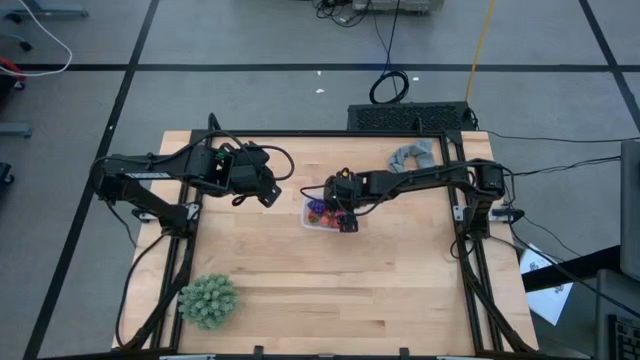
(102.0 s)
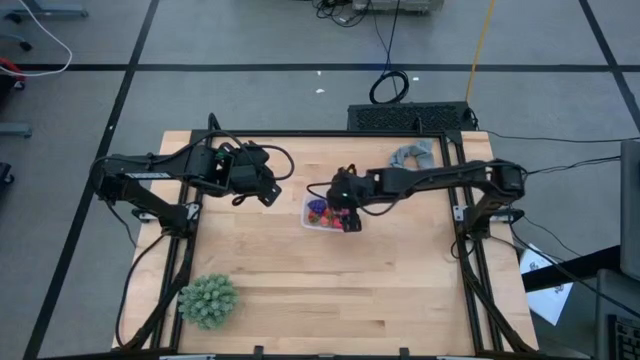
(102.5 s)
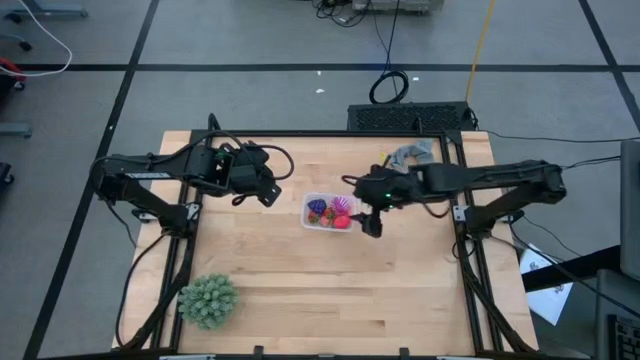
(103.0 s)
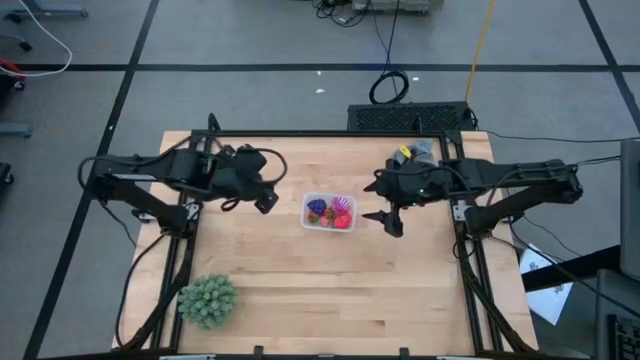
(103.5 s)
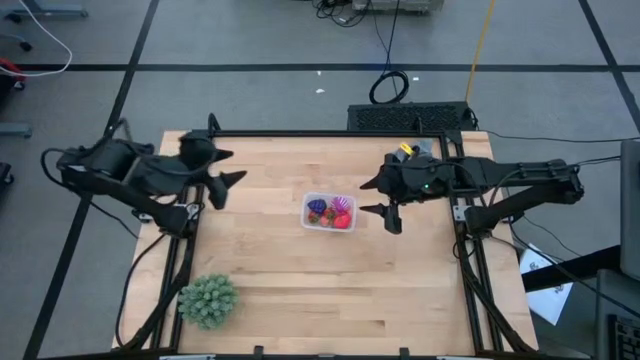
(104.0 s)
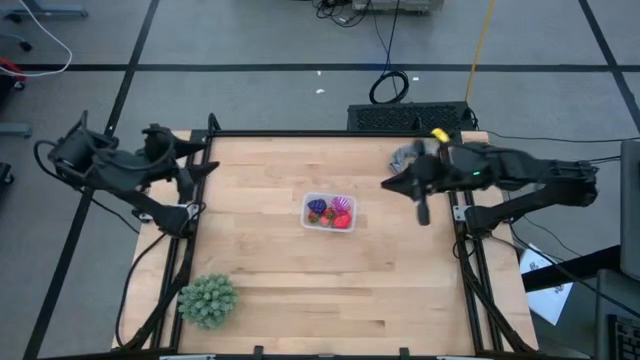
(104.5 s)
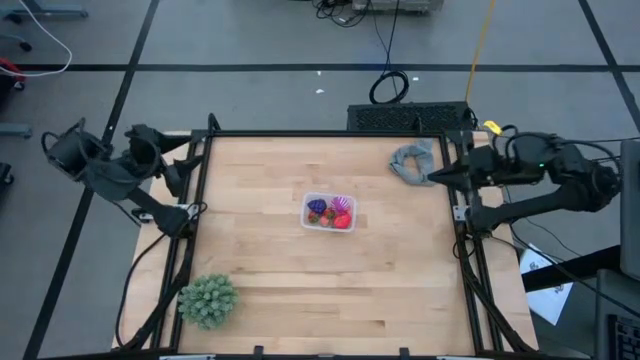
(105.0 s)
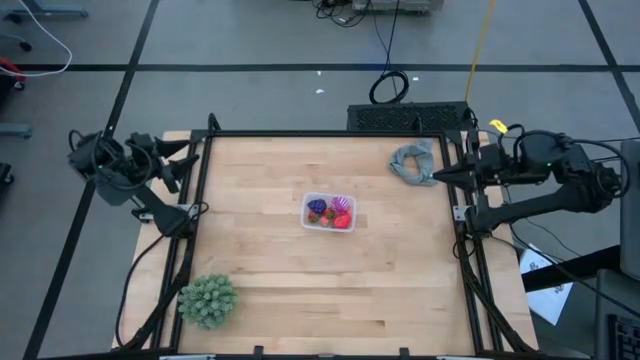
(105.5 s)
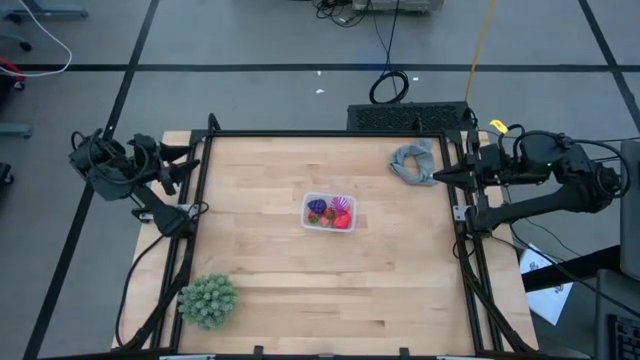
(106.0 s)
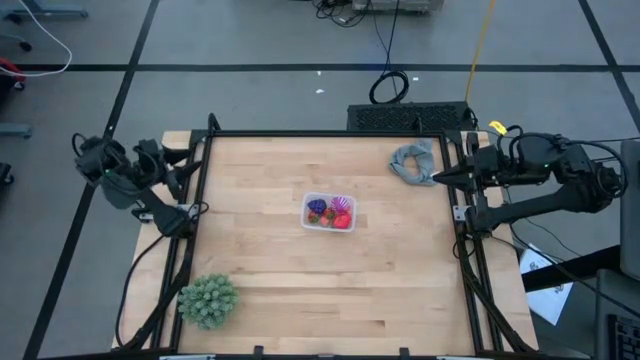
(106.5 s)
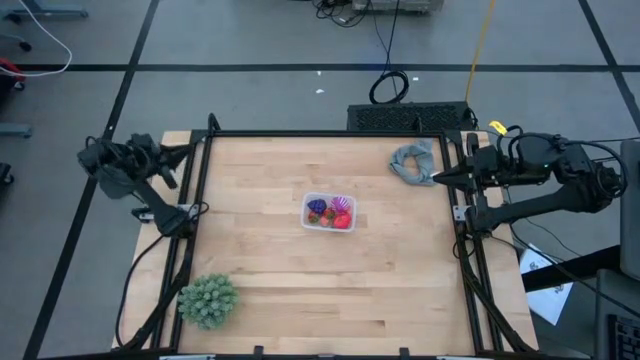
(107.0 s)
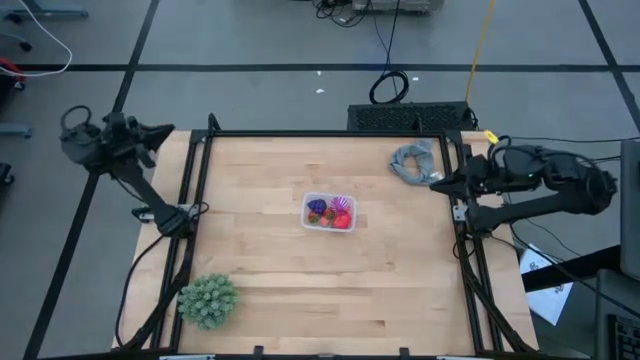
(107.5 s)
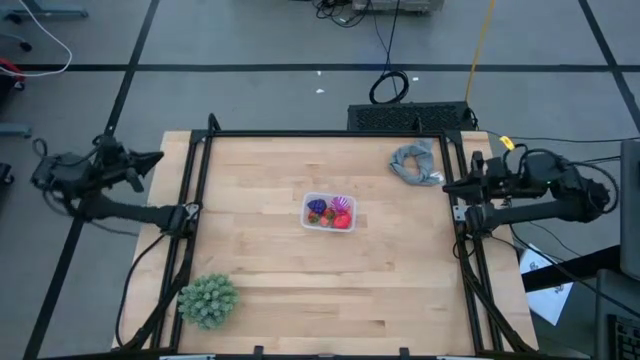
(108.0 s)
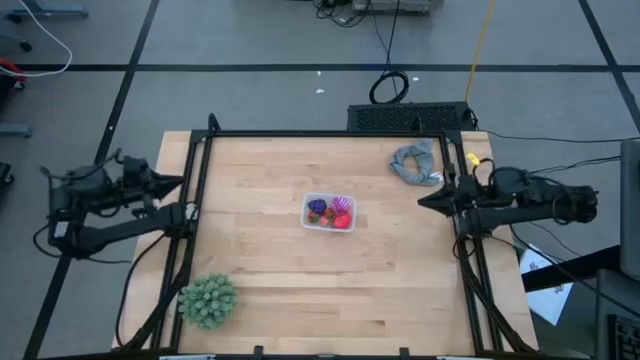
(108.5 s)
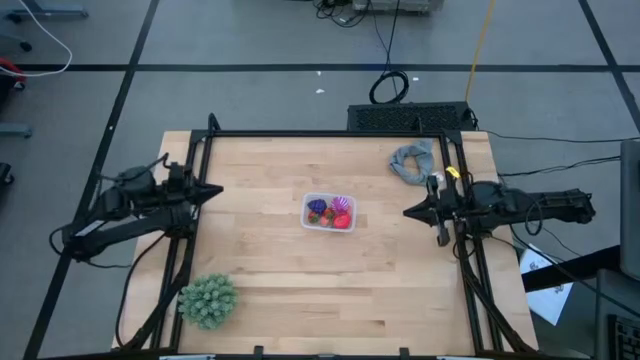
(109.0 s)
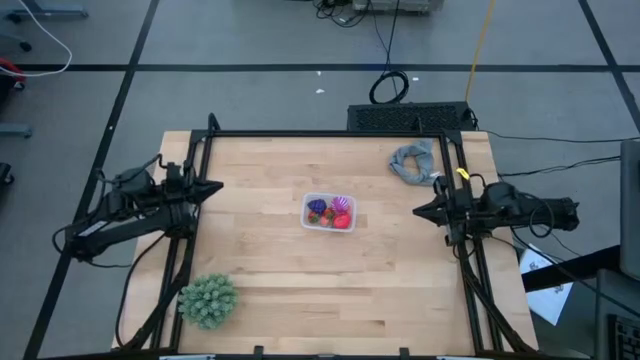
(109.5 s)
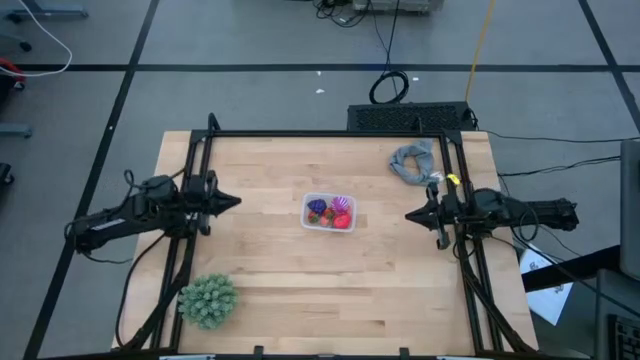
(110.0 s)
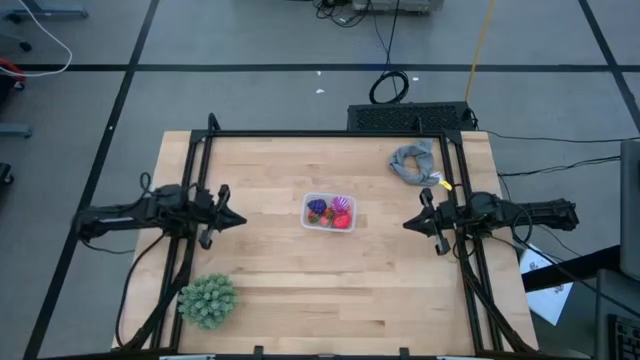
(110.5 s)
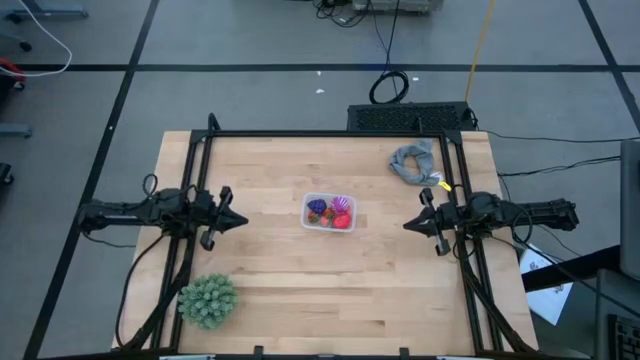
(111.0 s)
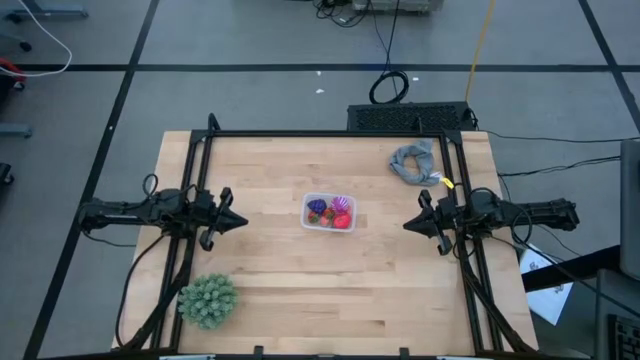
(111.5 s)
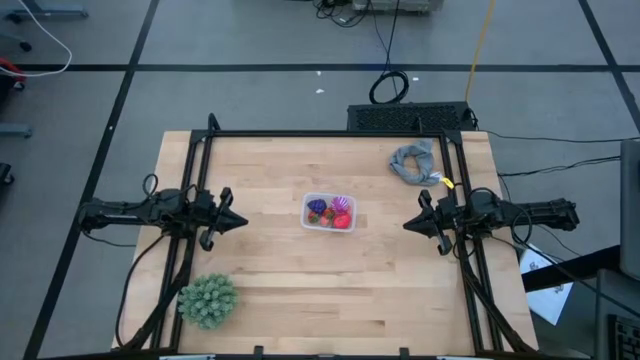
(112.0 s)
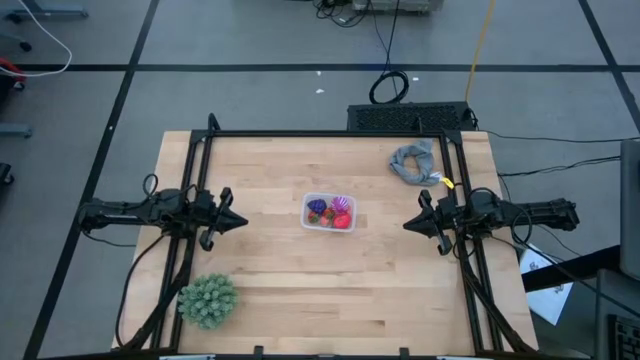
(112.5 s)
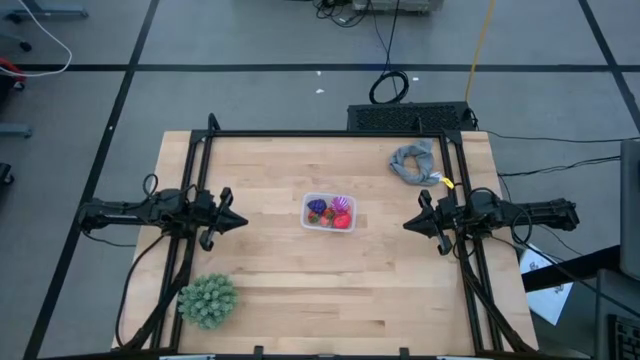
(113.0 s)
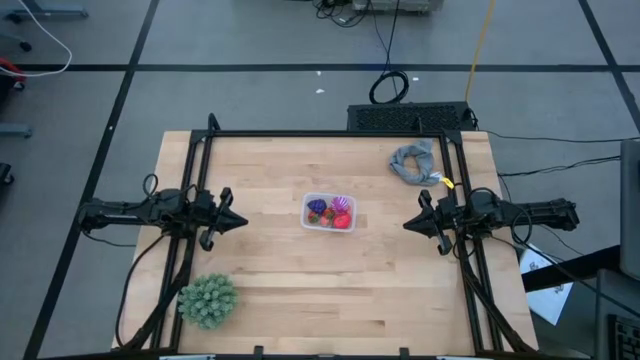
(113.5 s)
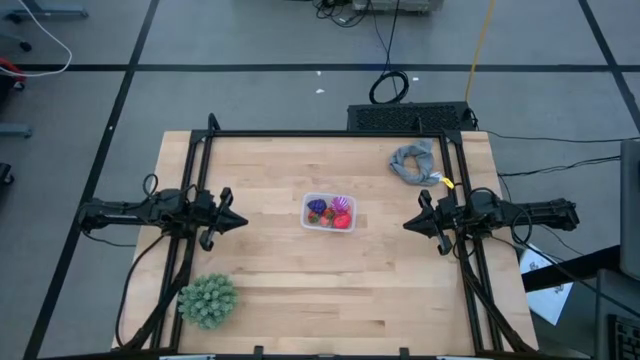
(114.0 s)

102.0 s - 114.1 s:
Task: Pick and placing Produce into tupperware
Return to Home Position

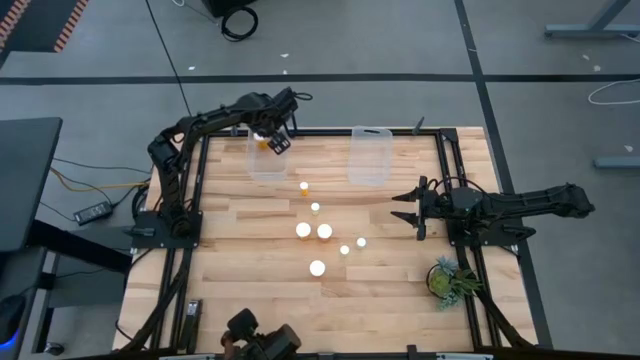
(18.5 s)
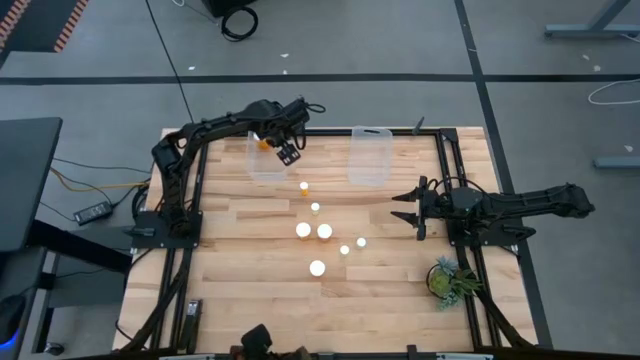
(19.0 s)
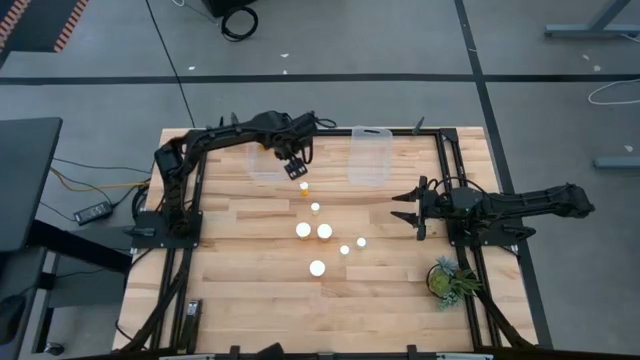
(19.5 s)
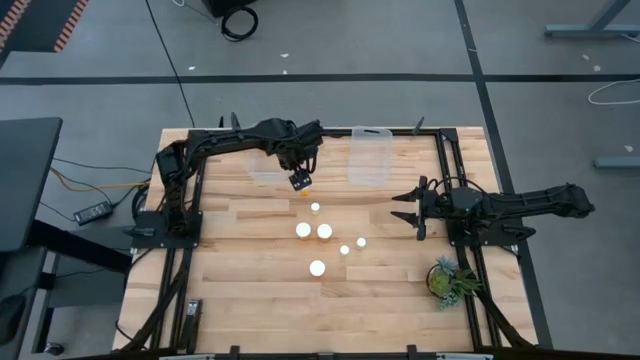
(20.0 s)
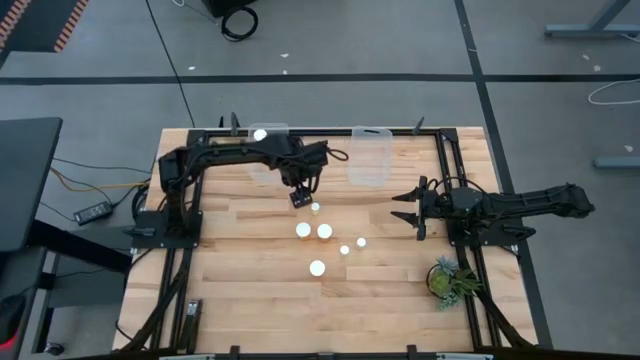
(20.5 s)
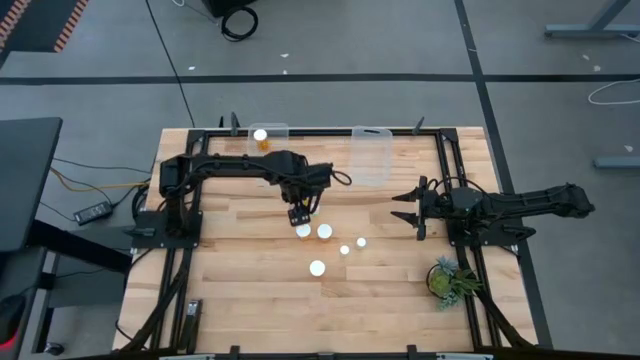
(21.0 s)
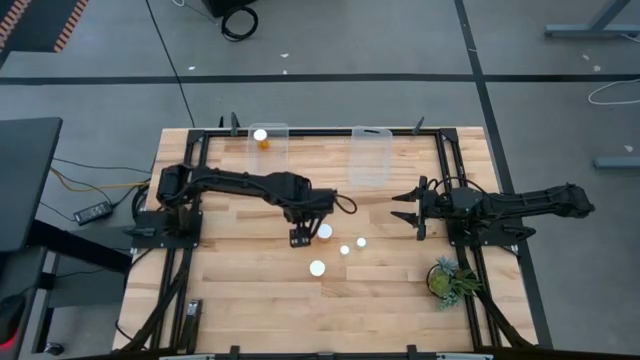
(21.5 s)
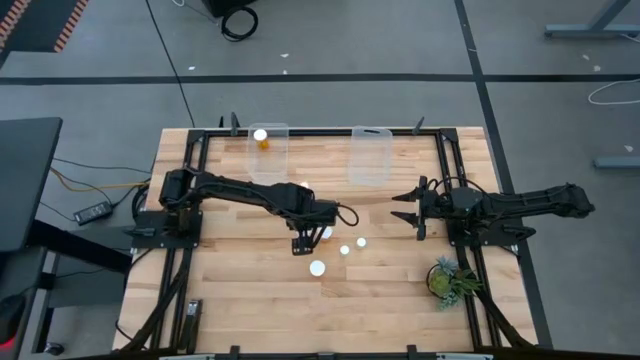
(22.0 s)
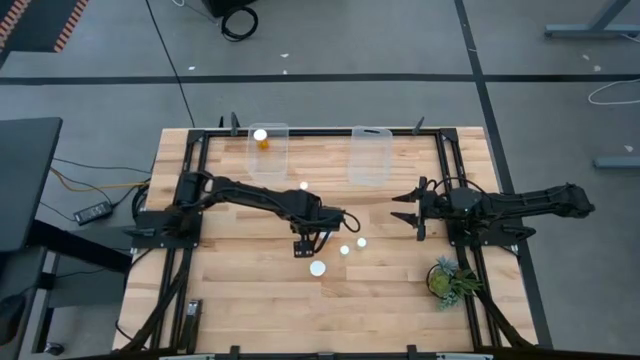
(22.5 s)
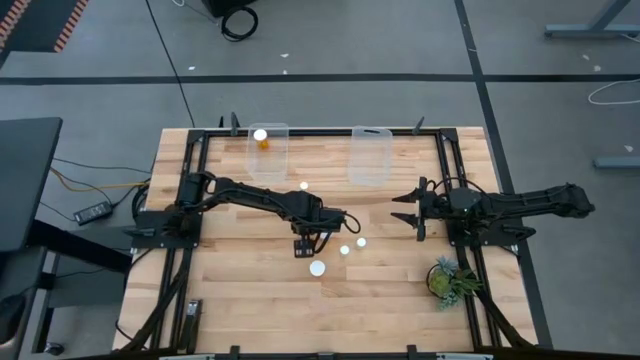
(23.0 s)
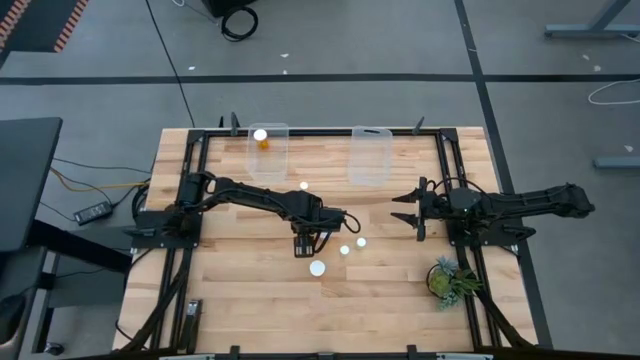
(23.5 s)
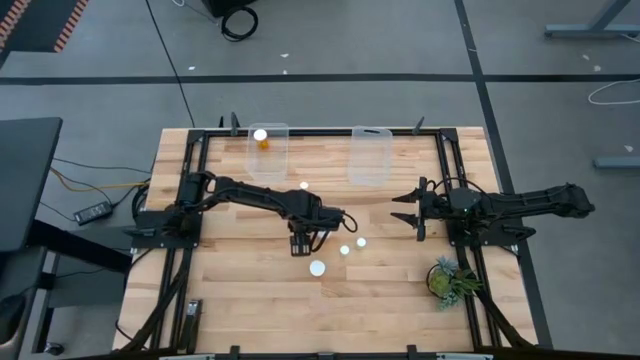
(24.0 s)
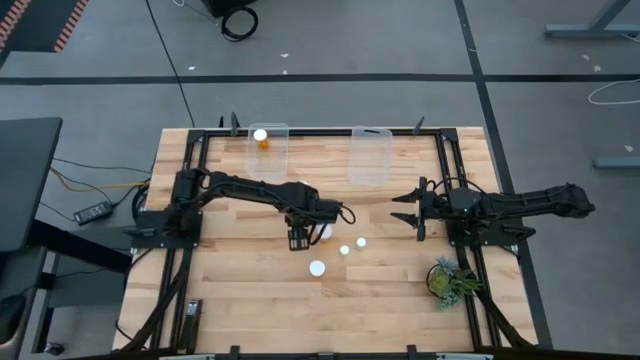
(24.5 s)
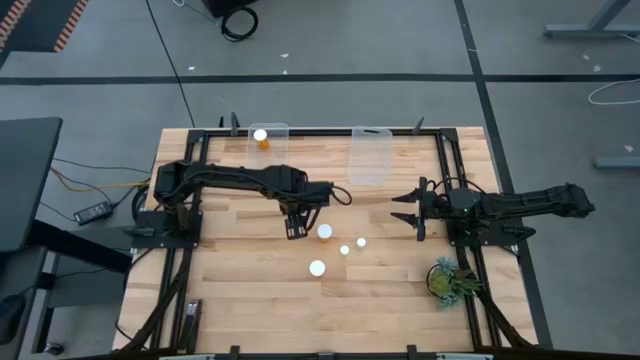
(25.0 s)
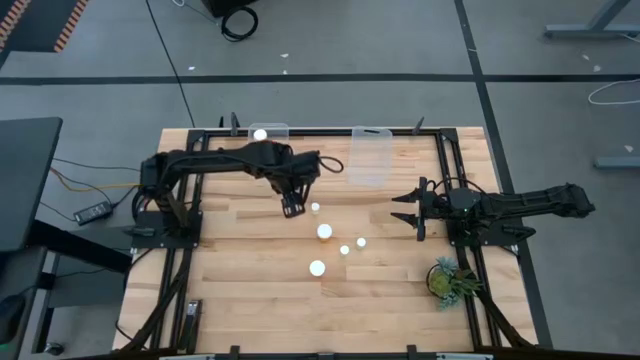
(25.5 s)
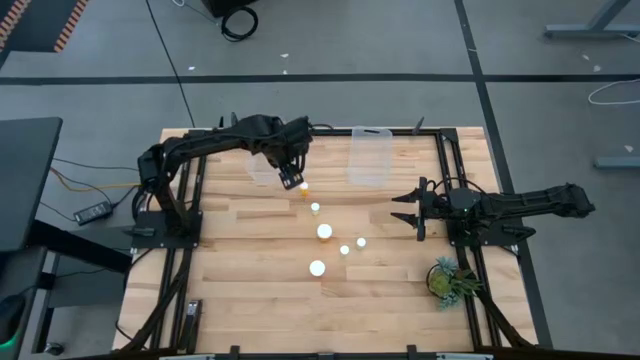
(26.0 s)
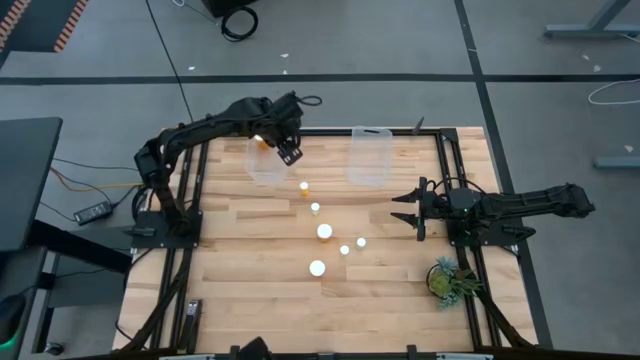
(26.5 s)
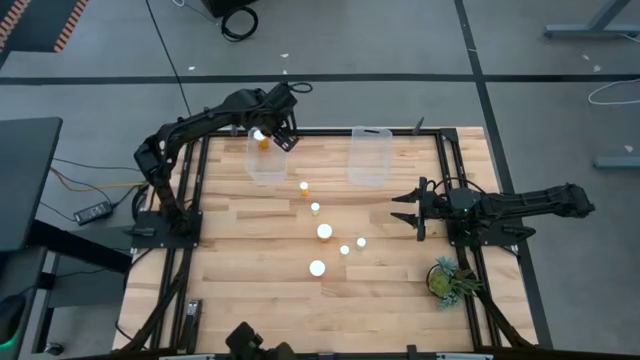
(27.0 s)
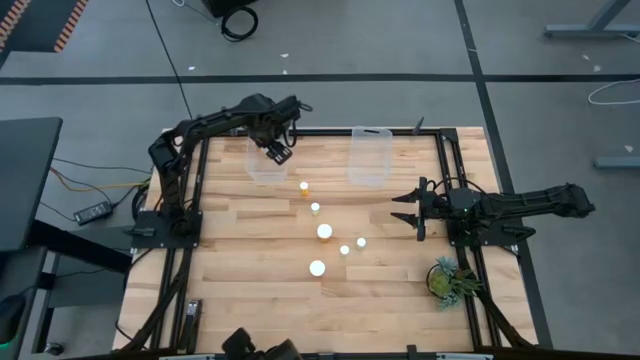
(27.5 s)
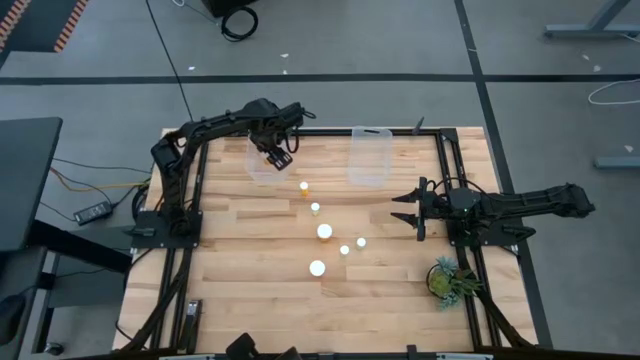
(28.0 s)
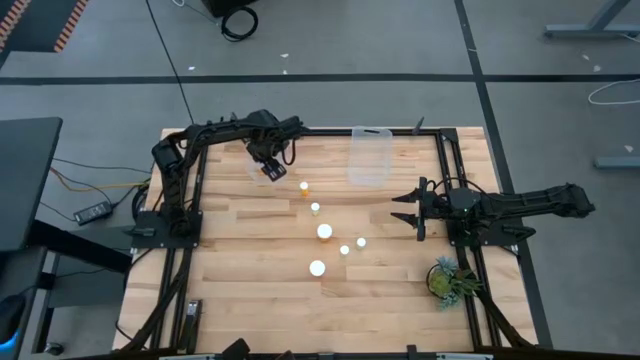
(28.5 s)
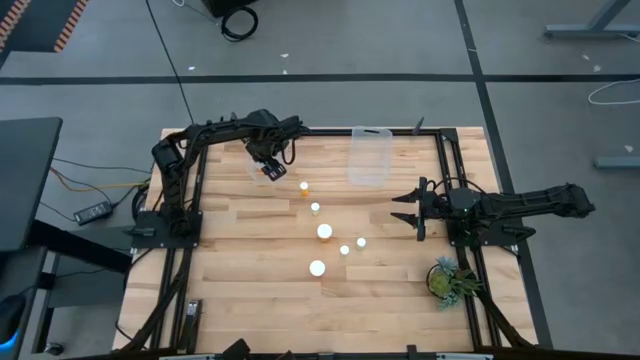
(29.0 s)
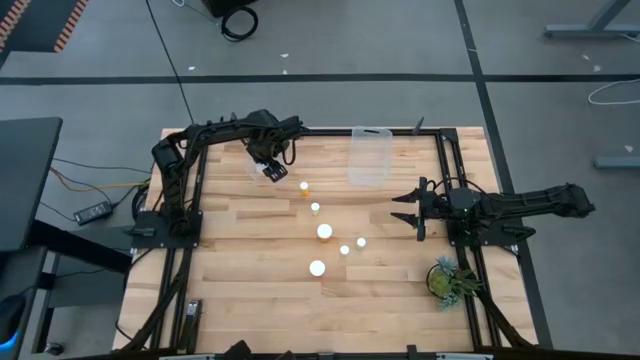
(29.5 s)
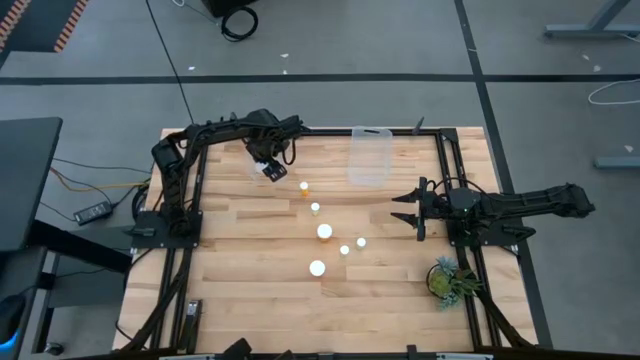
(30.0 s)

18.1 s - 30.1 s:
Task: Pick and place medicine bottles into bin by pill shape (circle, oval)
Put the orange capsule bottle into the left transparent bin
